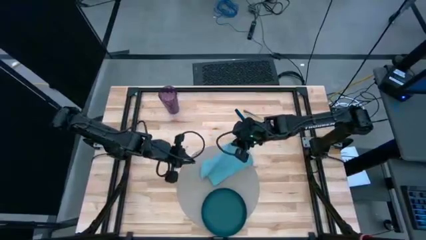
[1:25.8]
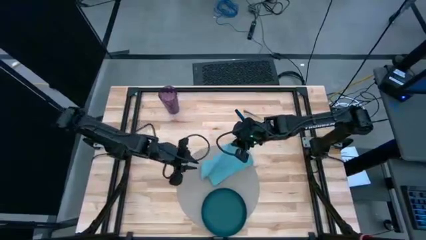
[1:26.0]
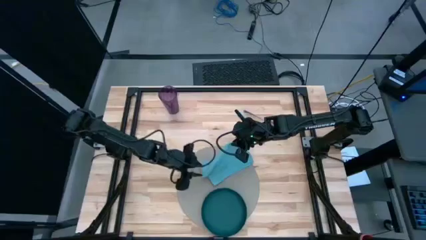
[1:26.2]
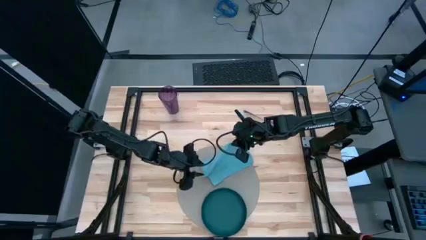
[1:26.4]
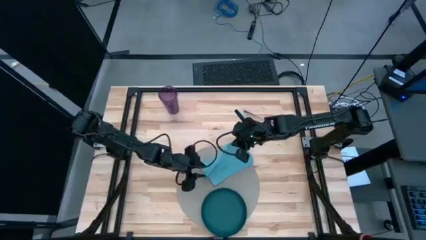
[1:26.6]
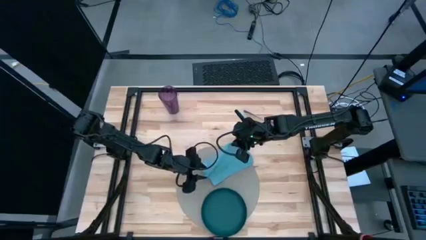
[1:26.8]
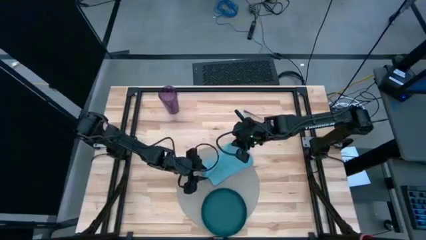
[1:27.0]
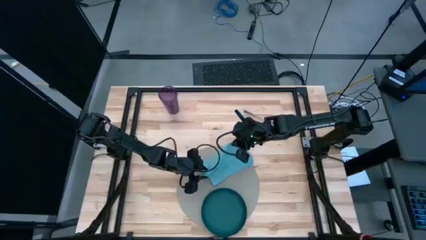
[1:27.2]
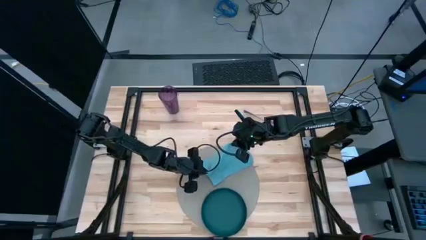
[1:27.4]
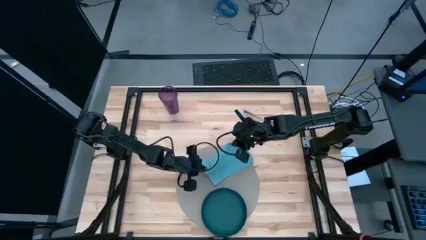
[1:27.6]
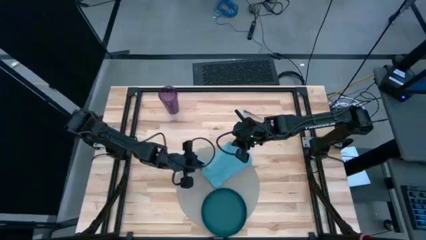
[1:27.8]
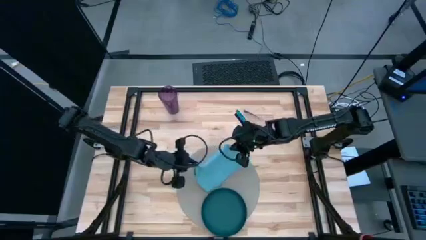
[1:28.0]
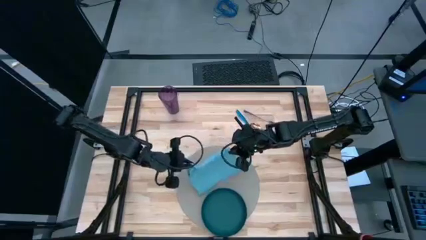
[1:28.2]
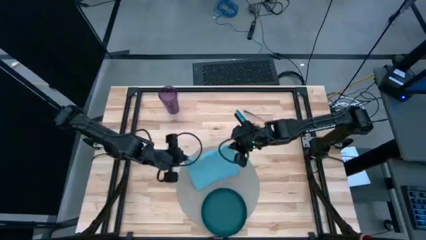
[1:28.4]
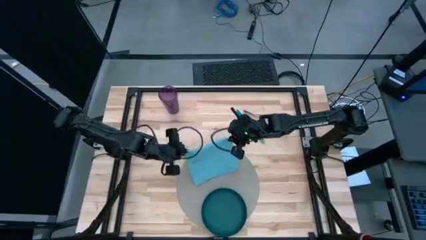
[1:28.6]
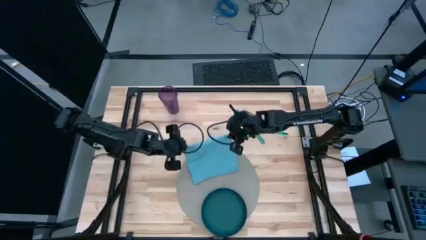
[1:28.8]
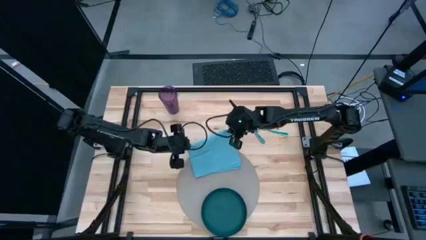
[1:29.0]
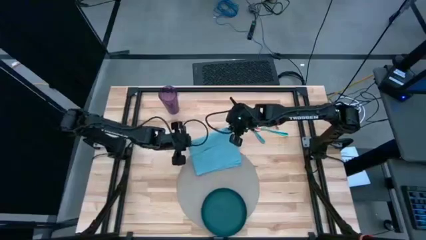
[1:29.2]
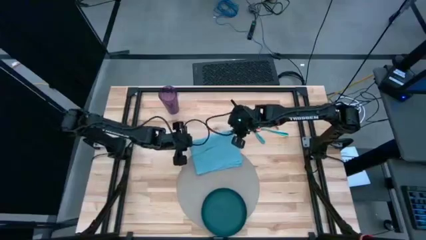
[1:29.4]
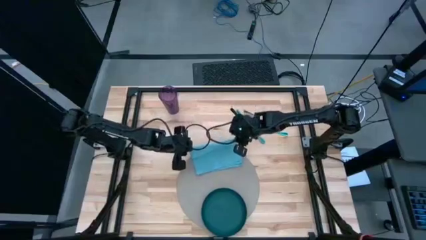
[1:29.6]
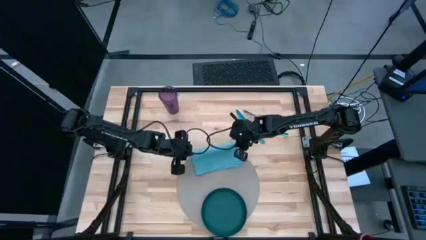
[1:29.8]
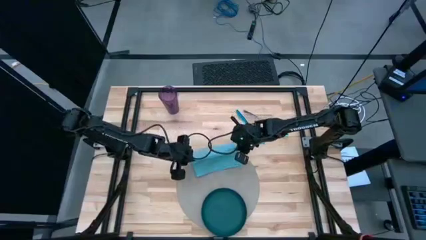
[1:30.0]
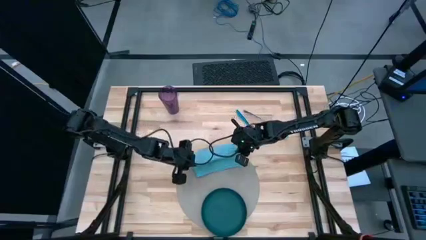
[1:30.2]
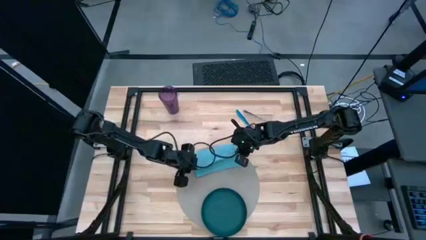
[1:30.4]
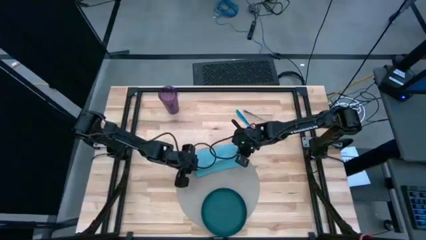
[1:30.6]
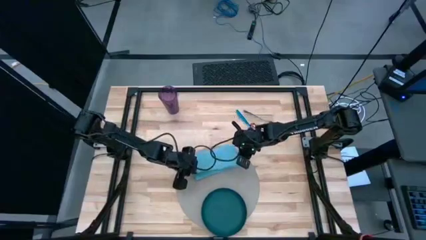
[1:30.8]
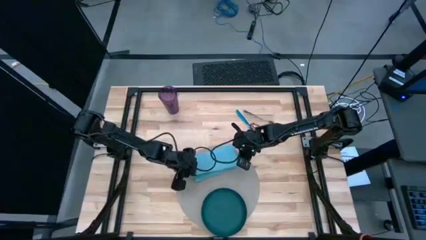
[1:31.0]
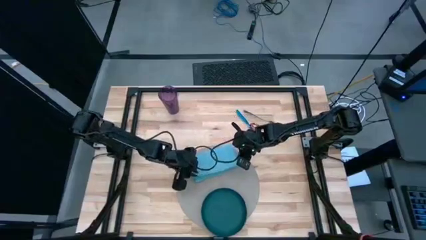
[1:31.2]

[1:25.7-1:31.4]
Task: Set table place
Fold the blue table napkin

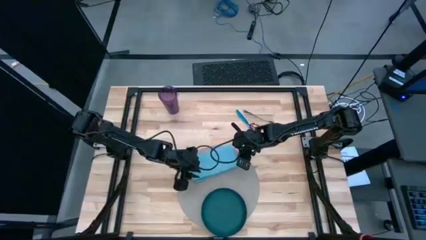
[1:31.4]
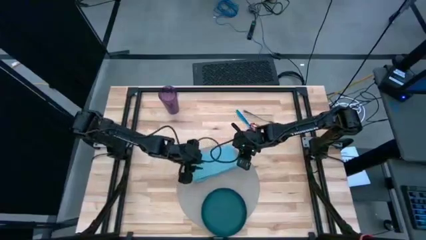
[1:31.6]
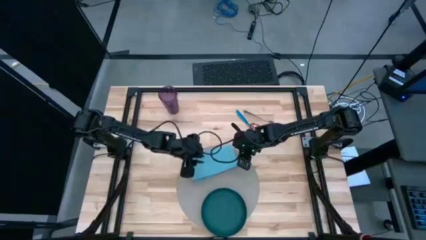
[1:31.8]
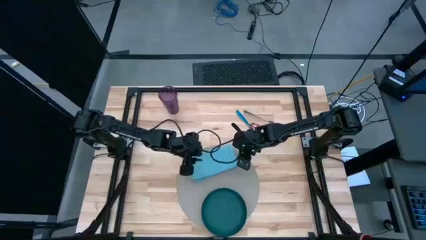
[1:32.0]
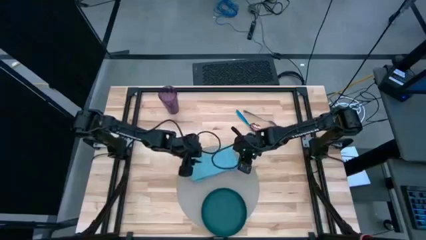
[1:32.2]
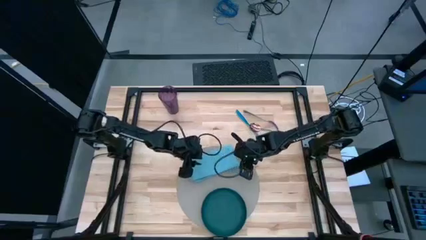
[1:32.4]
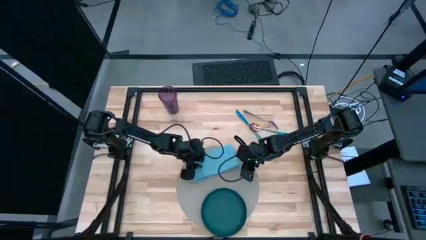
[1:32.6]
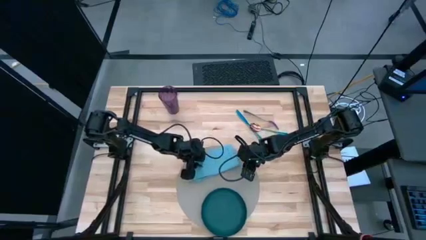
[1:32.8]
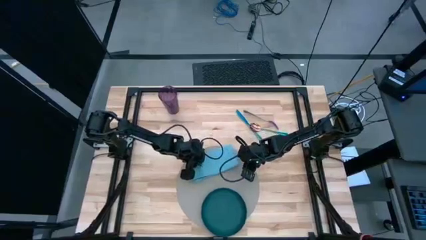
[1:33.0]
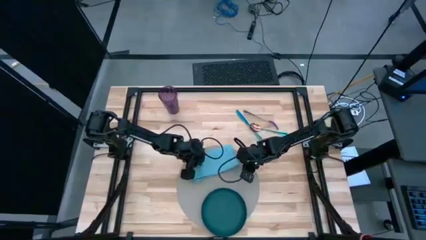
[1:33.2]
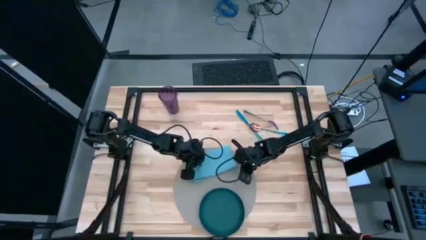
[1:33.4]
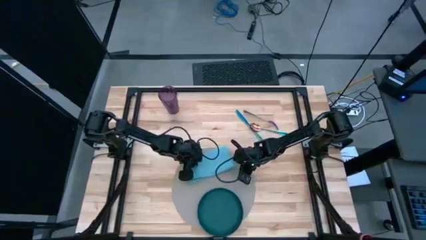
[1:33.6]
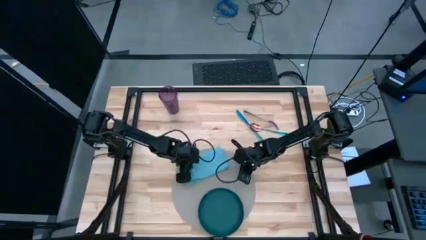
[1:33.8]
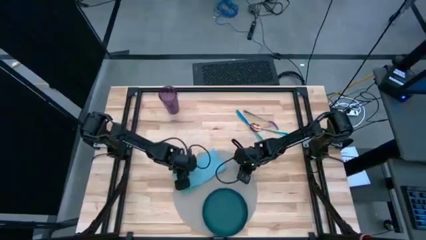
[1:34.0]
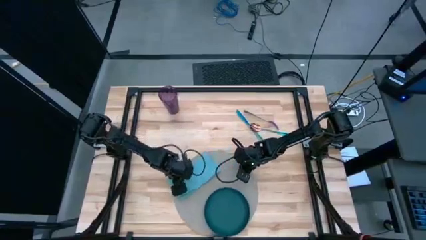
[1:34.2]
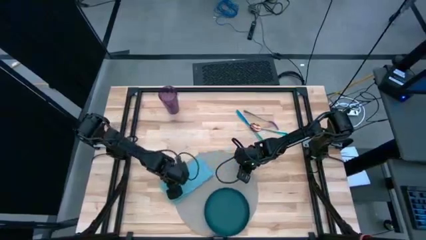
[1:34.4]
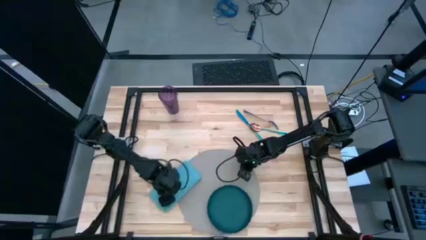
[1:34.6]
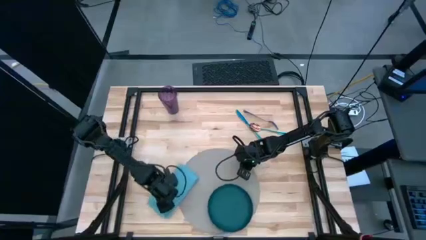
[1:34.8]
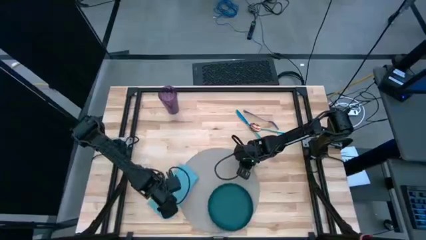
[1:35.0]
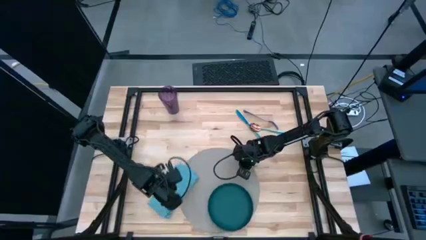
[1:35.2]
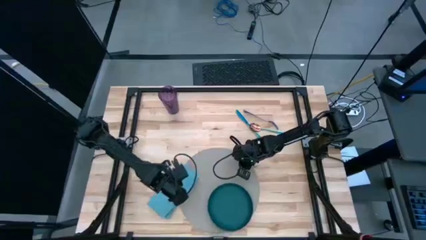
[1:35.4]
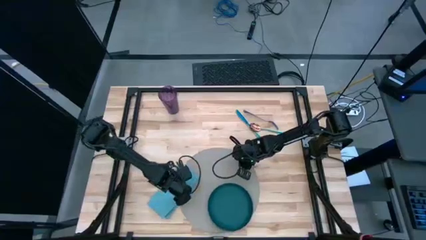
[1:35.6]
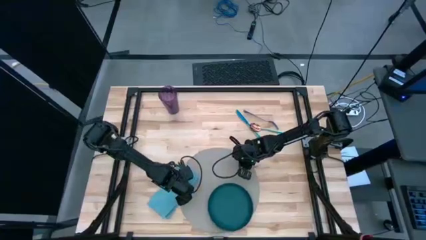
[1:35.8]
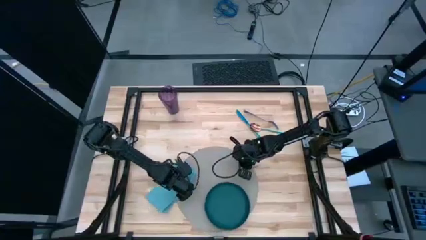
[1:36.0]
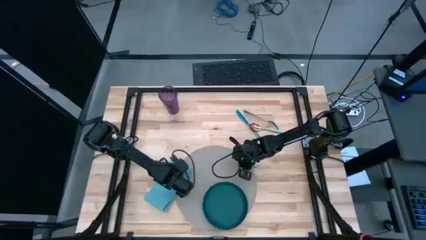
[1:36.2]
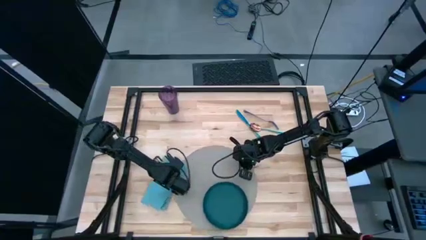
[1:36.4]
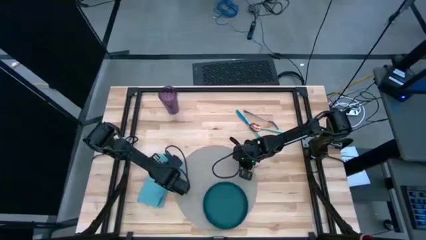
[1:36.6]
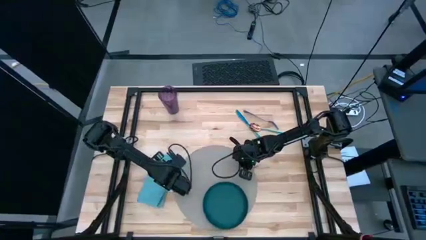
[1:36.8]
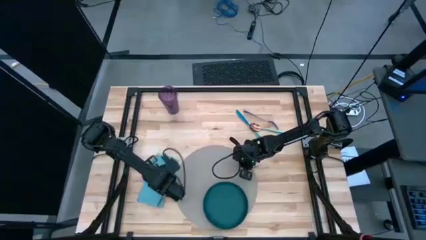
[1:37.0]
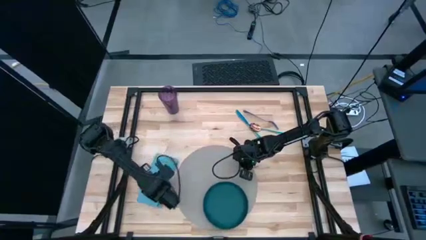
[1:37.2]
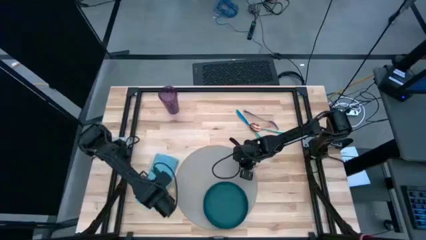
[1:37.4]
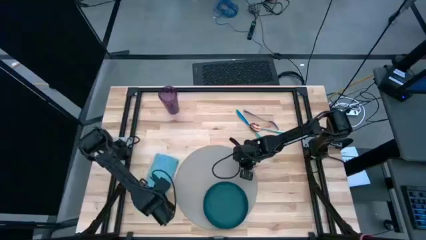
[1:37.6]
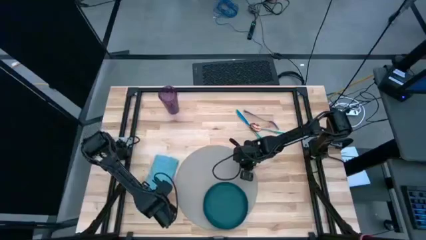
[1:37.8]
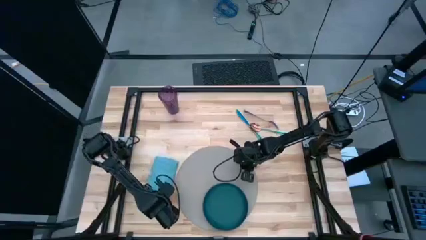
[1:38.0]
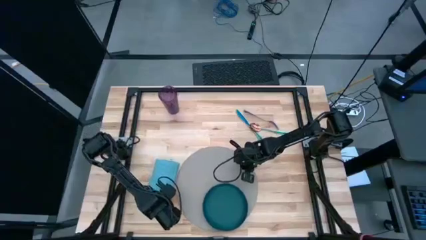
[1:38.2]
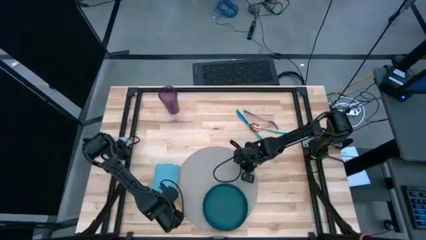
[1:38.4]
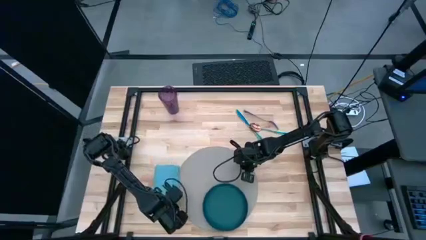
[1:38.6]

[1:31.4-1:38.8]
Move the blue table napkin to the left of the placemat

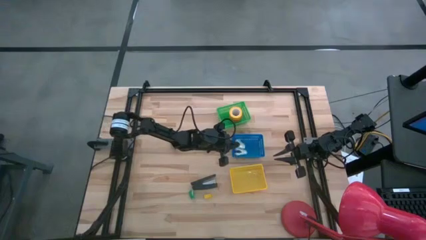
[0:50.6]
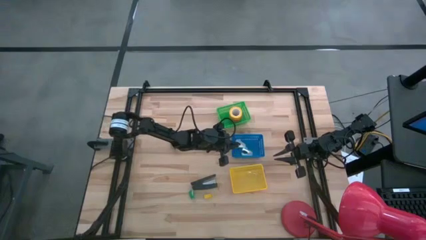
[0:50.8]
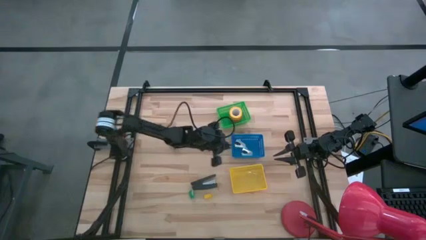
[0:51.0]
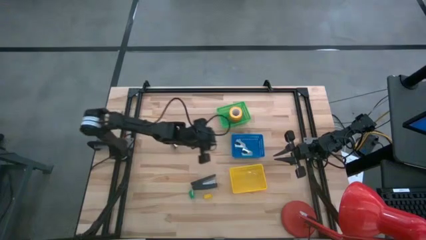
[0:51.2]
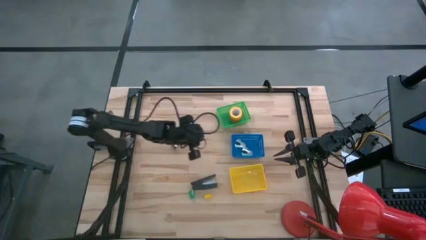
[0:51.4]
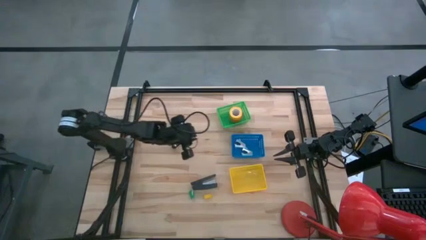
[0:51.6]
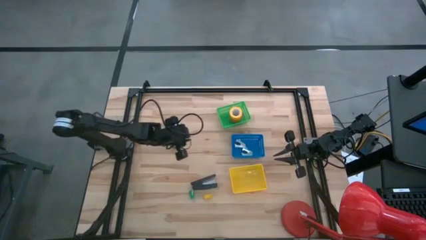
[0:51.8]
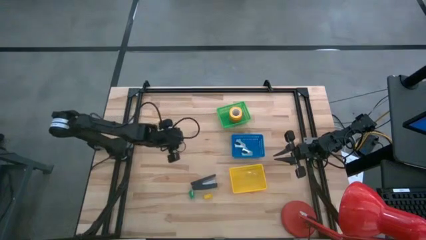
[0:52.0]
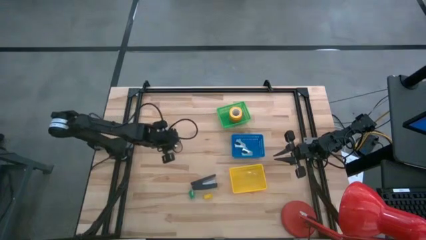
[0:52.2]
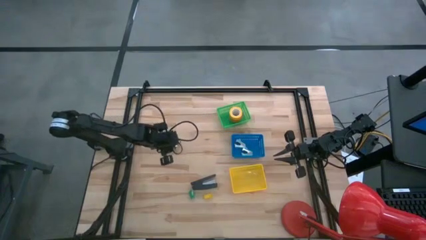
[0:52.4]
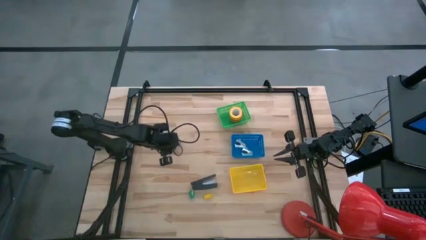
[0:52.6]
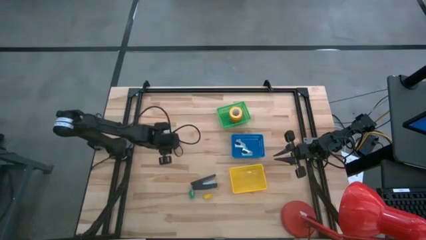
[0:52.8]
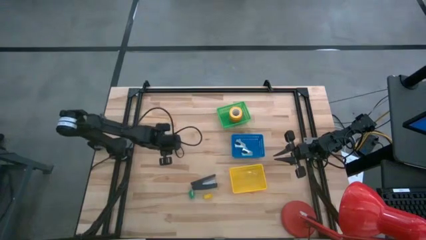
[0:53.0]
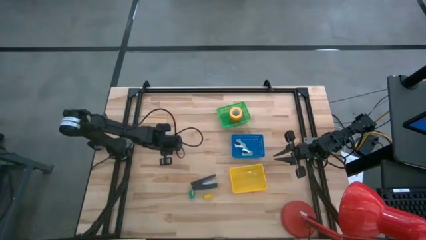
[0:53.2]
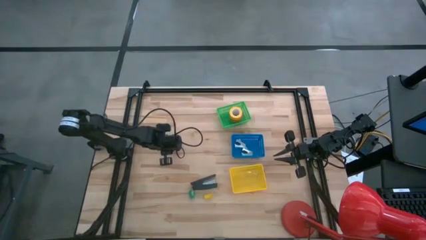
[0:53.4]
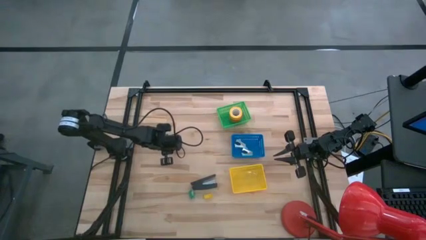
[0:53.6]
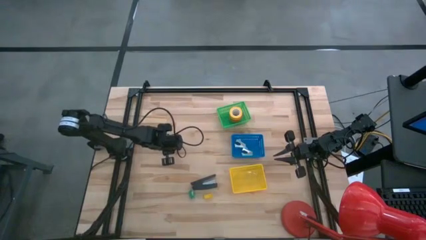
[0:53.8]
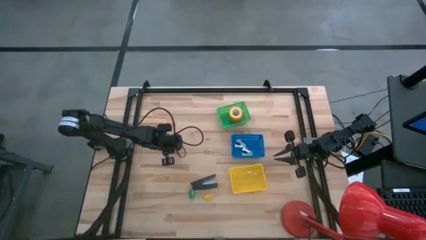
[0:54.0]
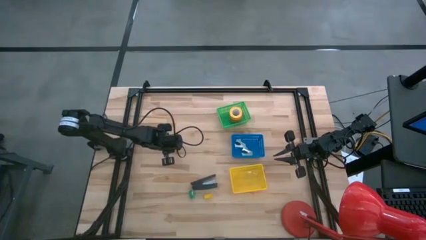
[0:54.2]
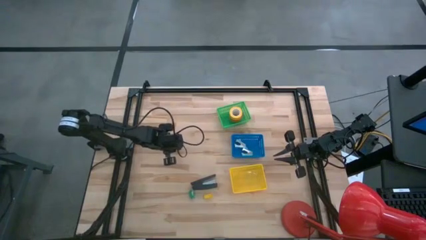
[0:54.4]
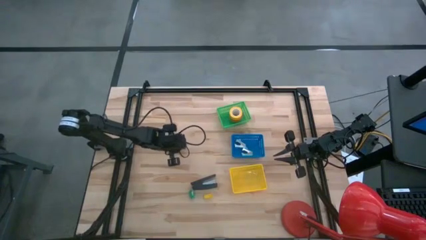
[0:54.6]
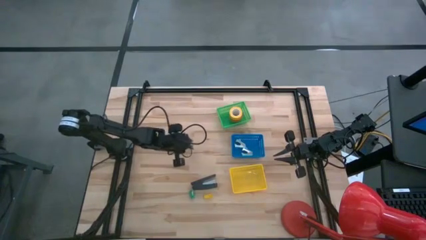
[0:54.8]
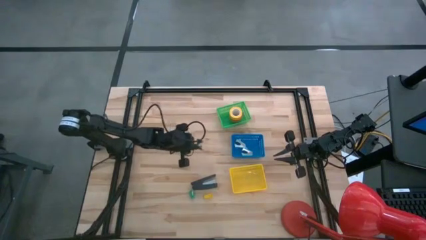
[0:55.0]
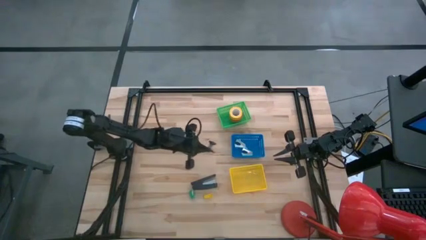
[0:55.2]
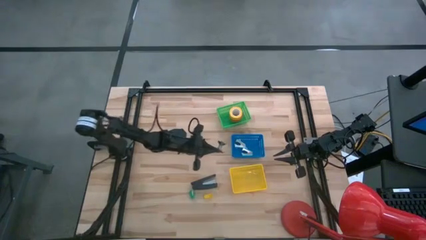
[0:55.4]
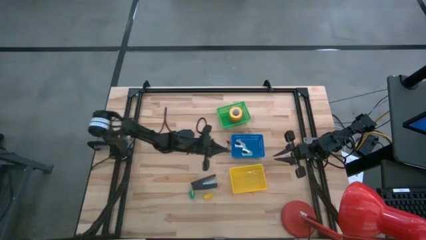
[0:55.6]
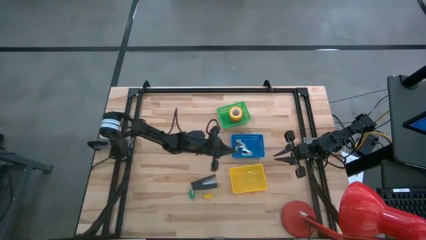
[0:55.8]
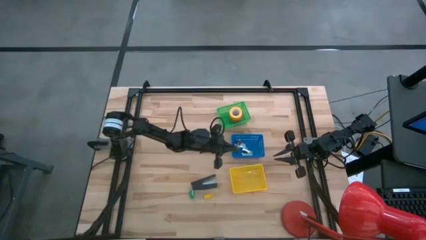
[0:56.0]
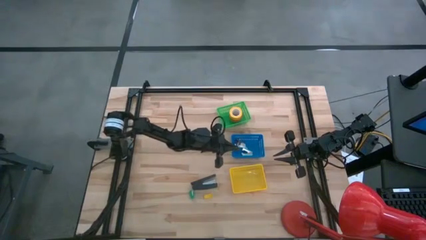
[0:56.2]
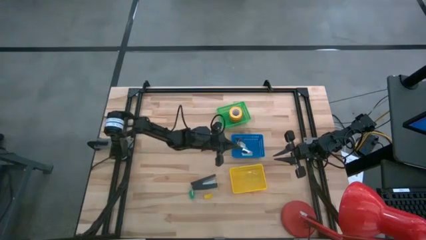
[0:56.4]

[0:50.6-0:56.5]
Task: Pick and place Stapler, Stapler remover, tape
Put the black staple remover into the blue bin
